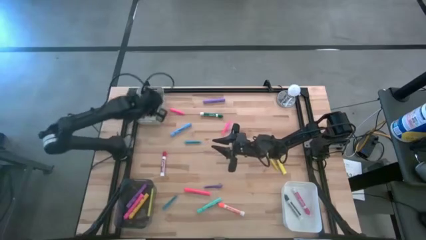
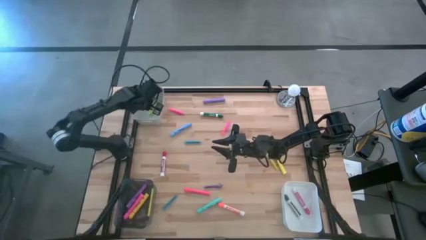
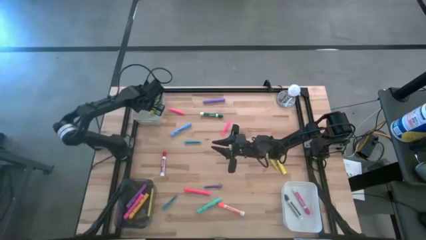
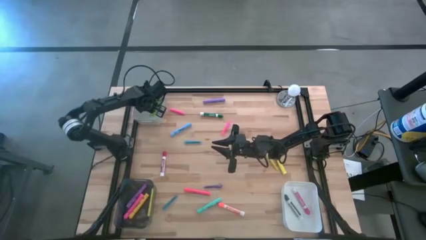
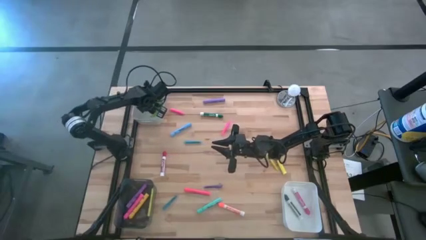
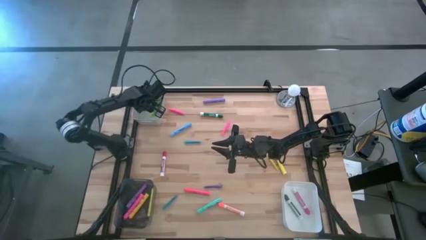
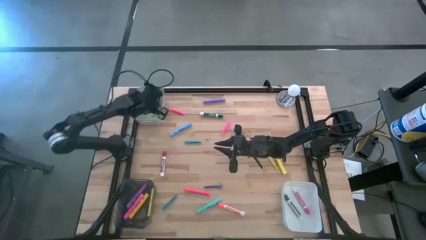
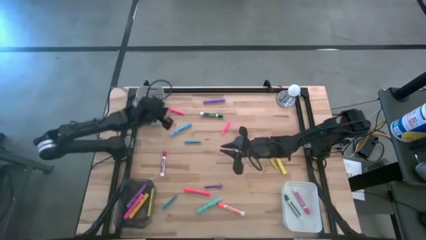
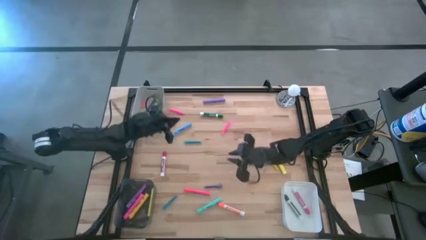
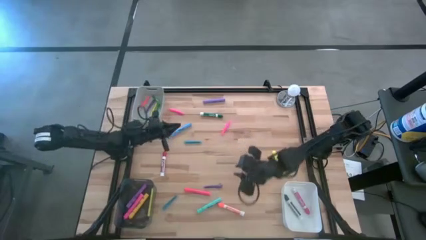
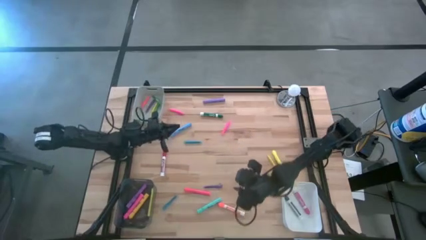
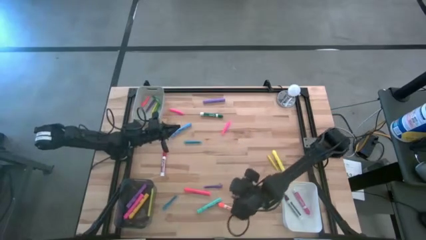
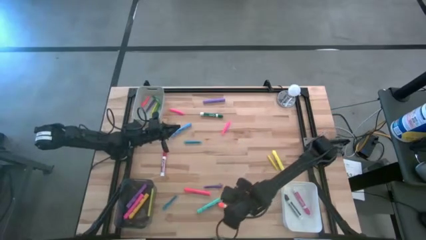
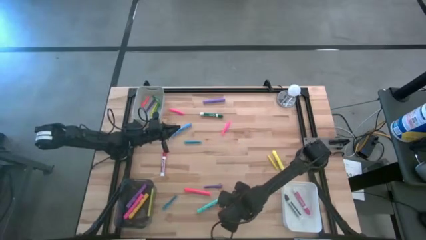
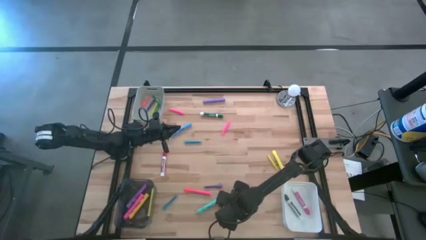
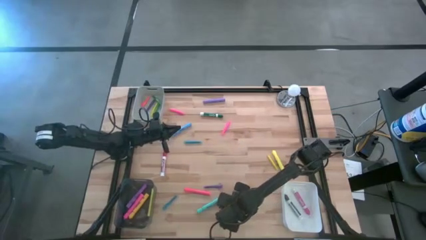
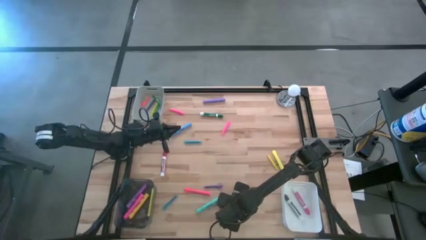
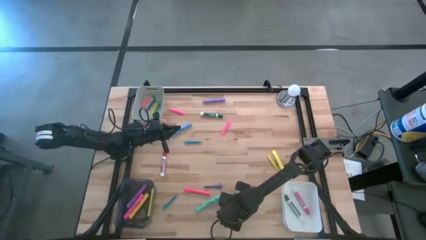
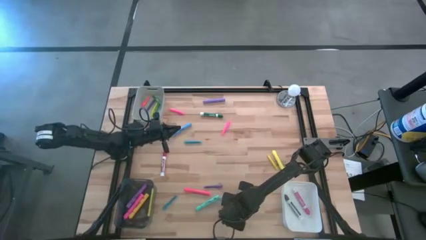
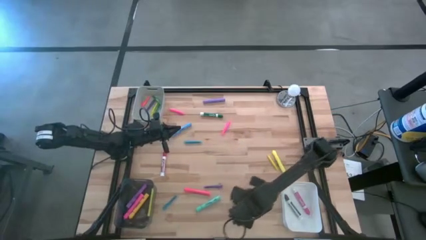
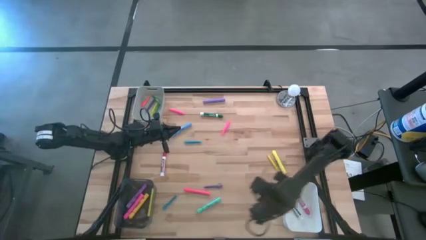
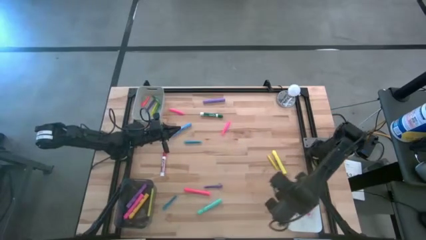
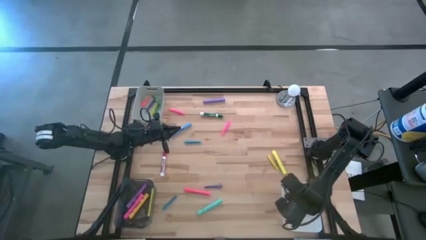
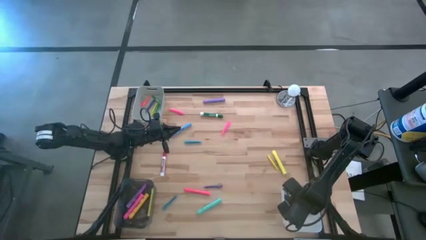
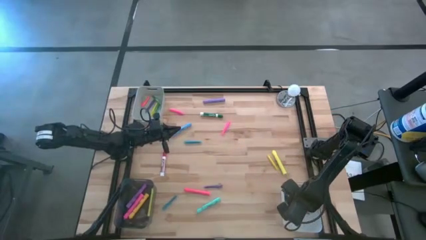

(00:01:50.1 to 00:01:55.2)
Task: Pick & Place Markers
Put the orange marker pen into the white bin

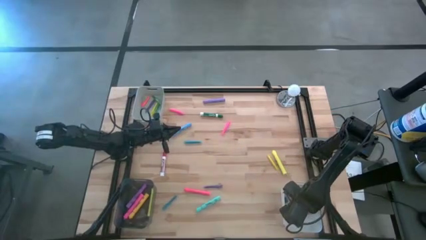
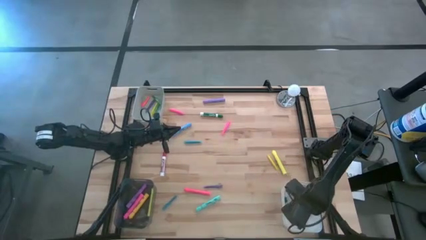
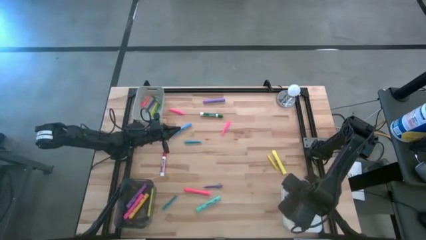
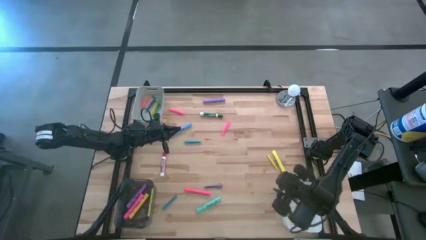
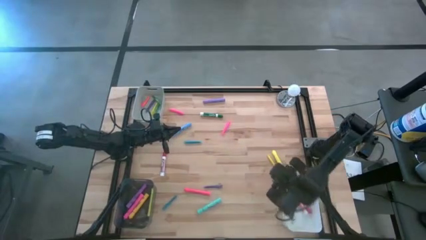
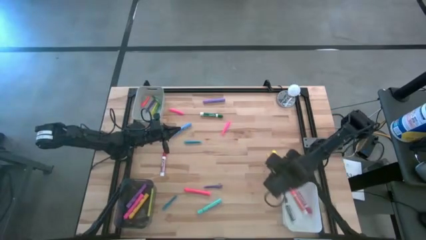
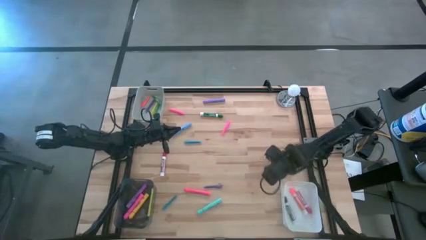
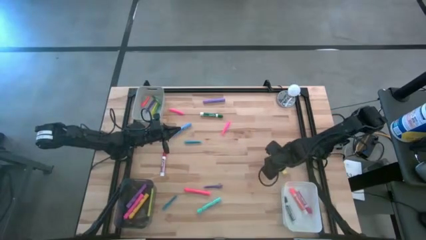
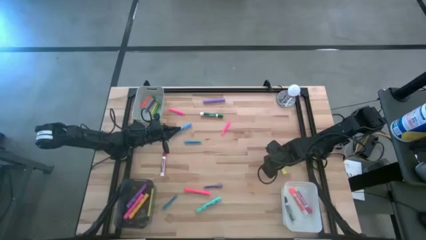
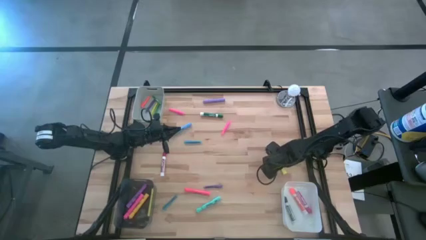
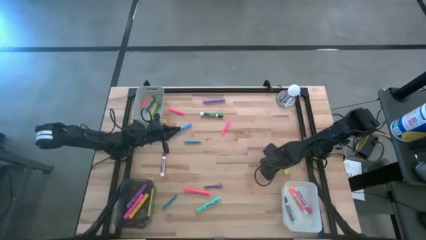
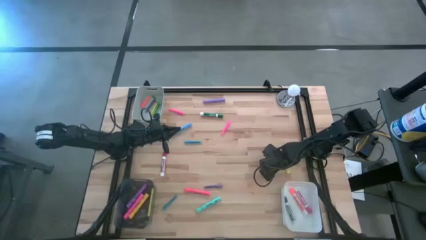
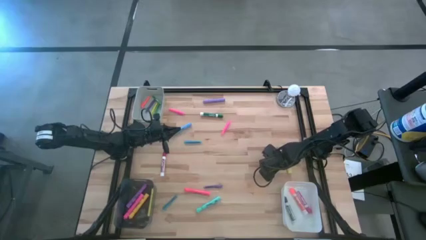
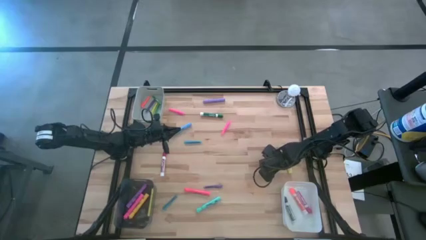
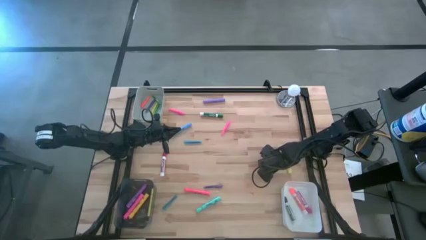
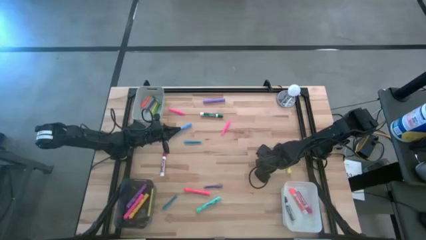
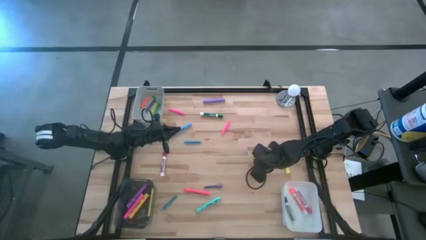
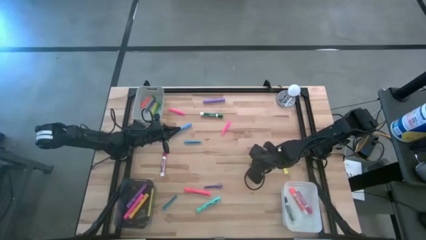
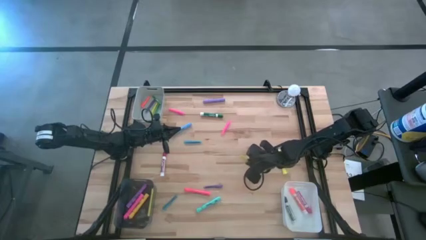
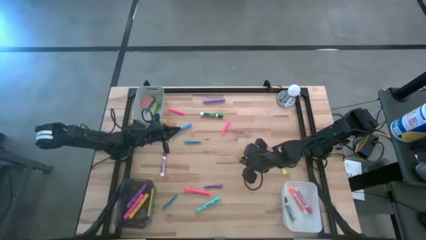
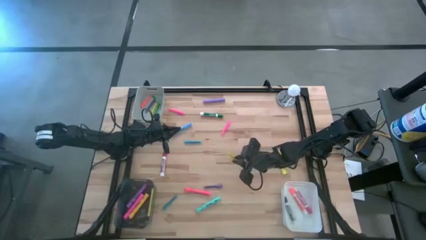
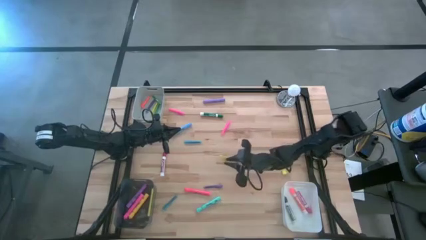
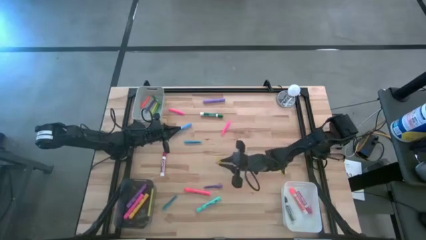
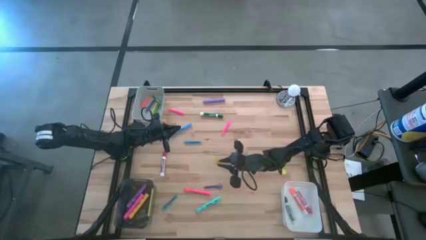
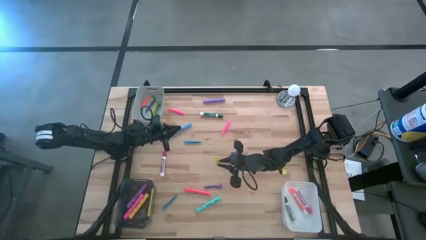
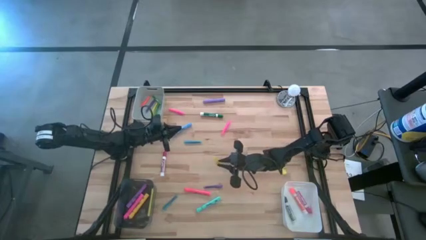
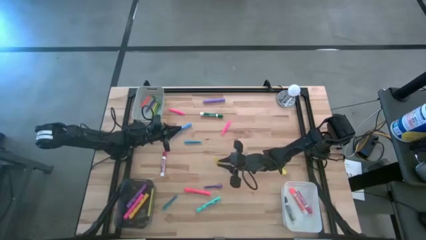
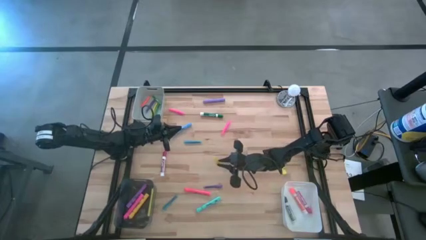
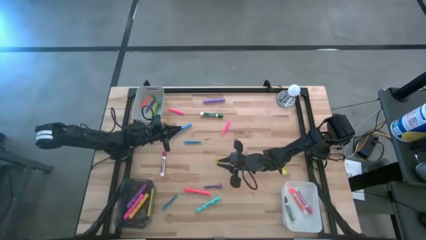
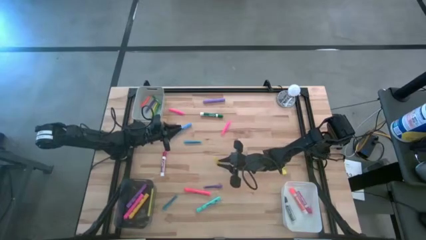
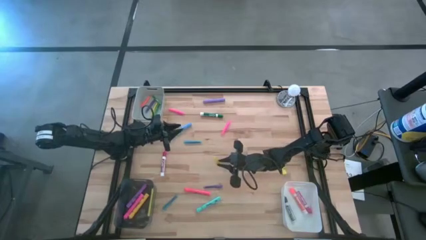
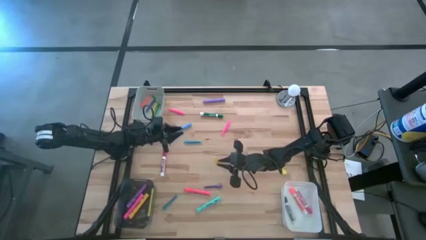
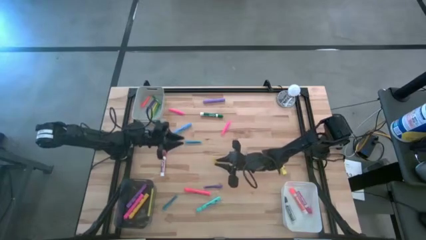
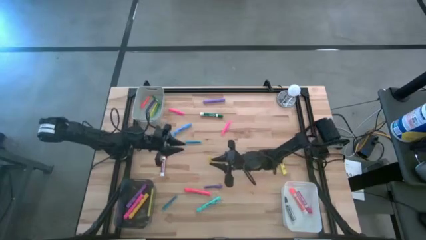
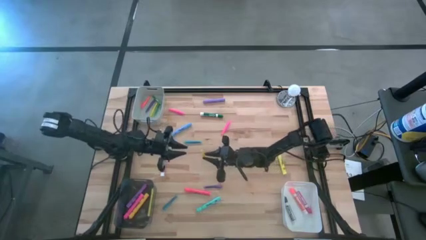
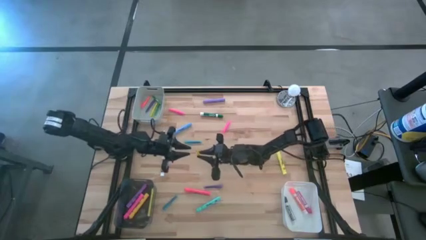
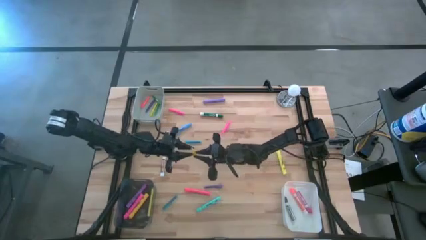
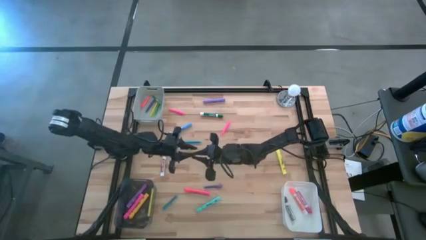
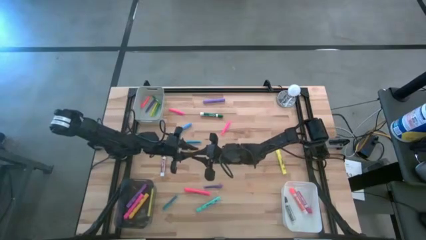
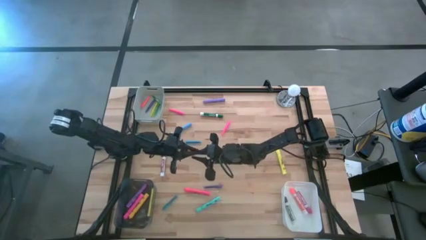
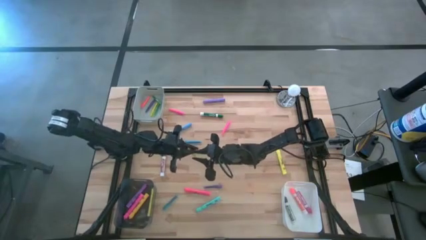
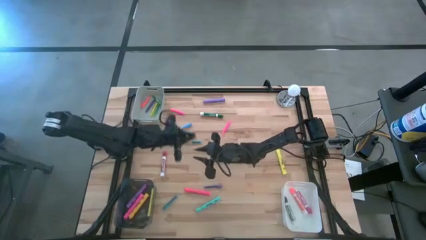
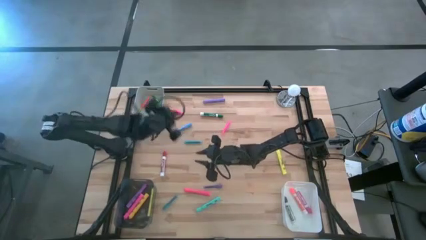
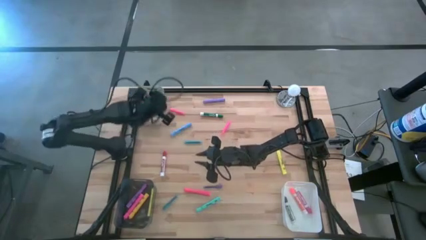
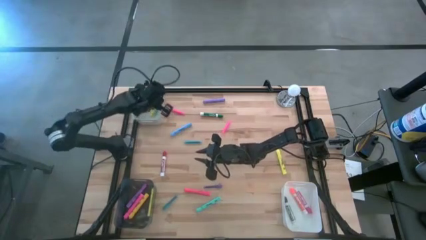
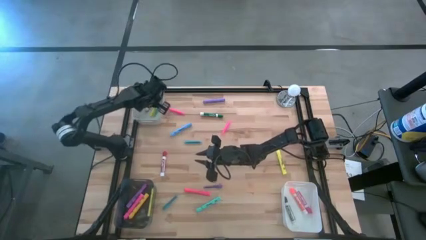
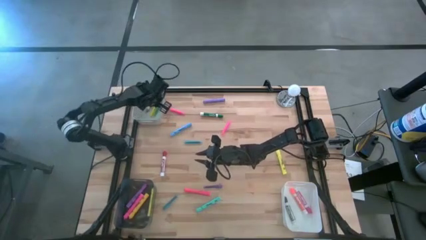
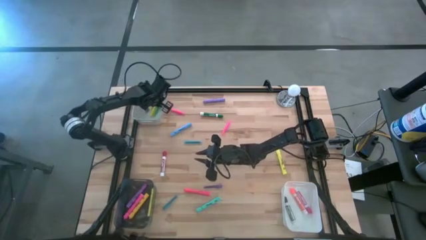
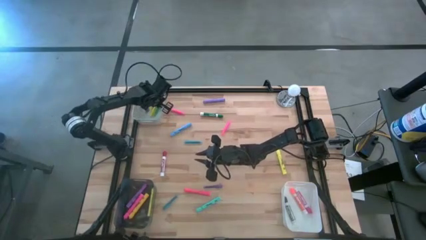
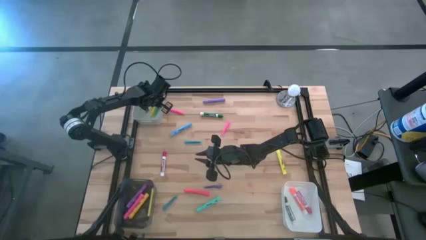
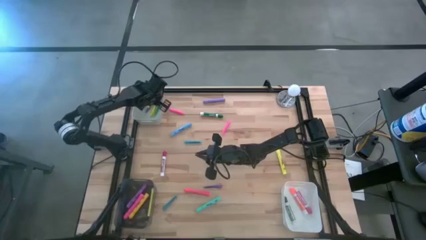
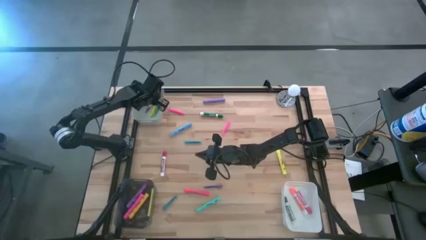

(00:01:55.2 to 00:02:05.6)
Put the yellow pen into the gray bin

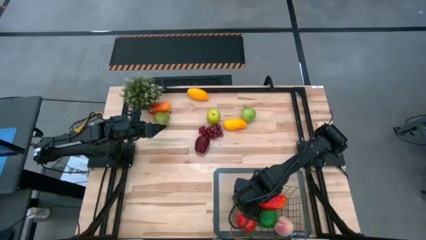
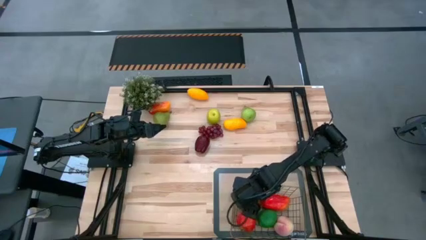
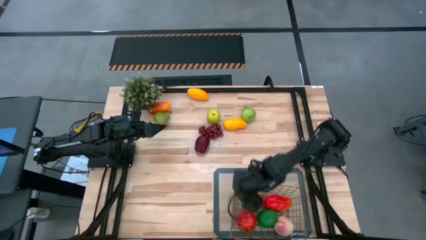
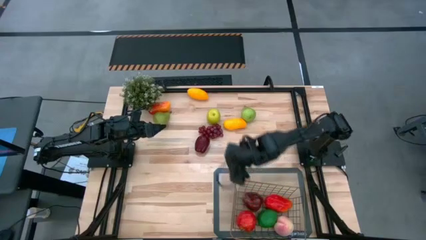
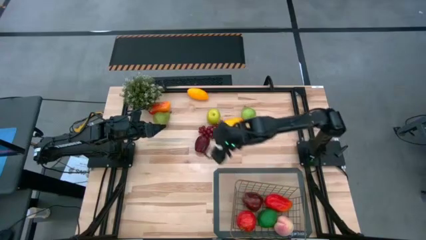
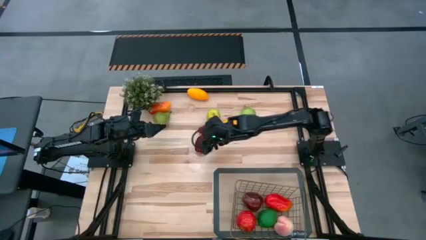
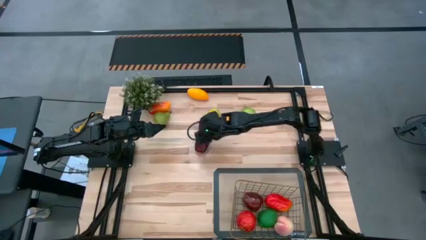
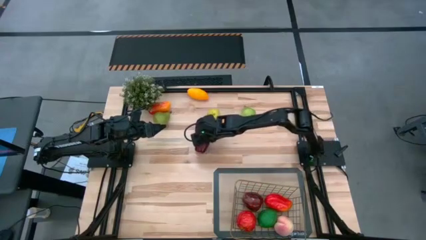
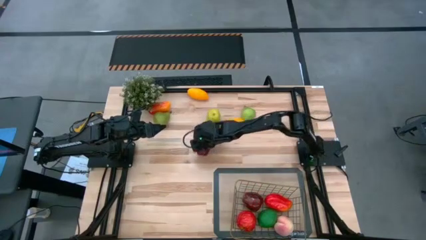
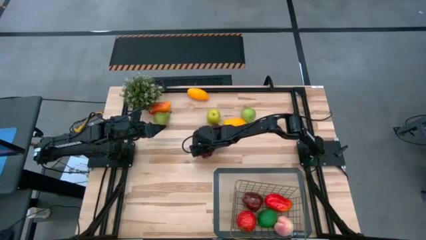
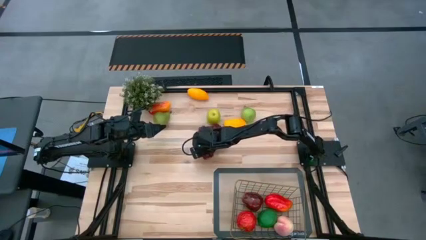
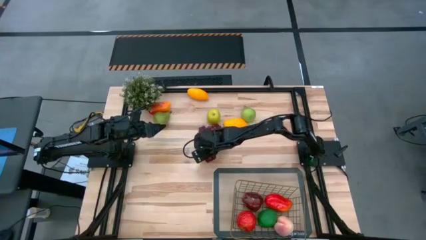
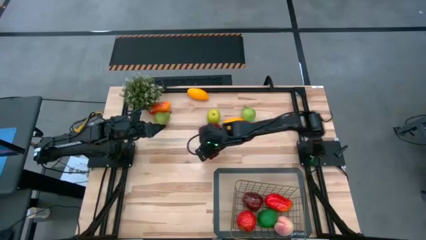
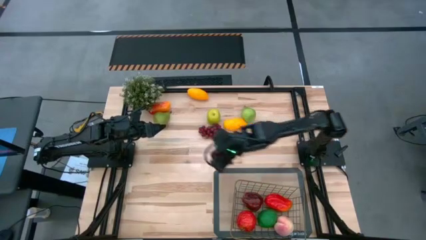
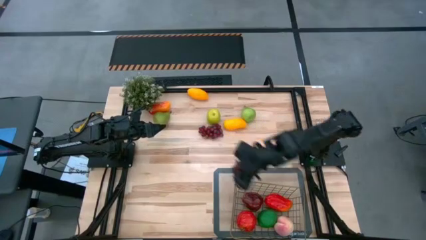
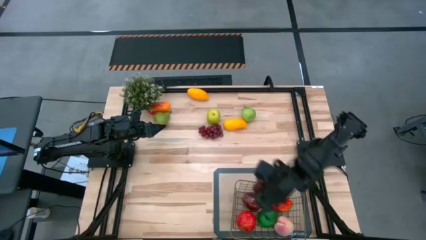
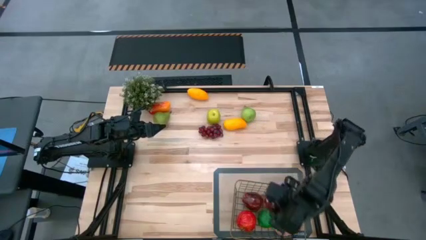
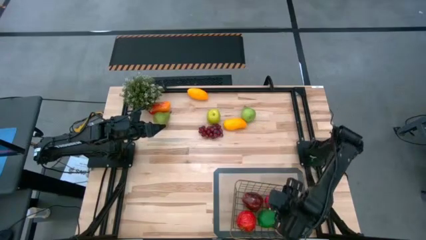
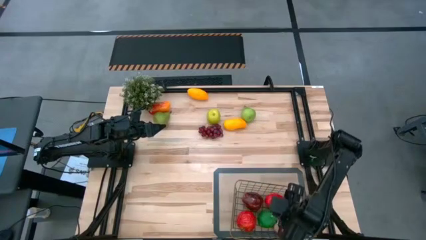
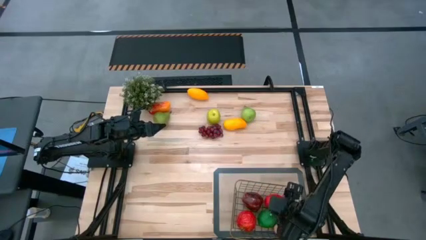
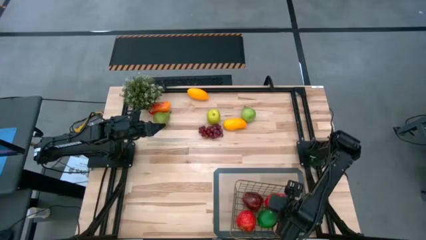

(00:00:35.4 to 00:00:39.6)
Task: Build produce basket
Put the dark red apple into the wire basket
